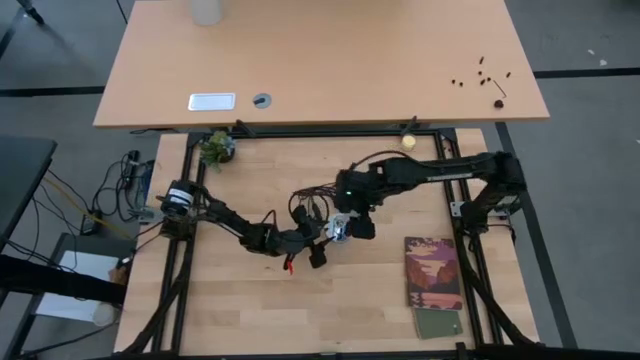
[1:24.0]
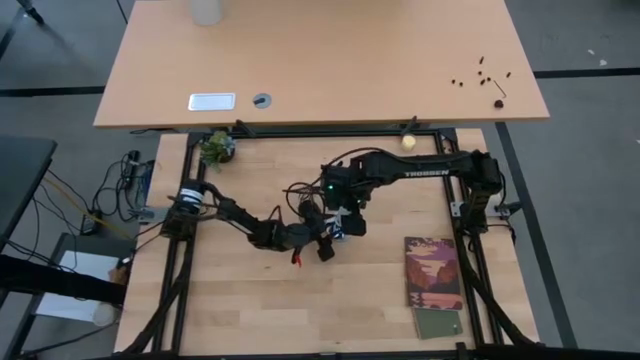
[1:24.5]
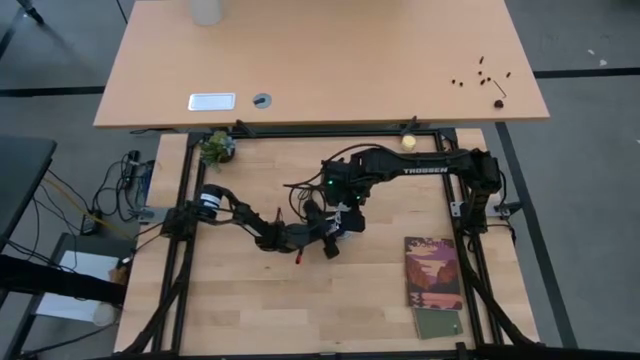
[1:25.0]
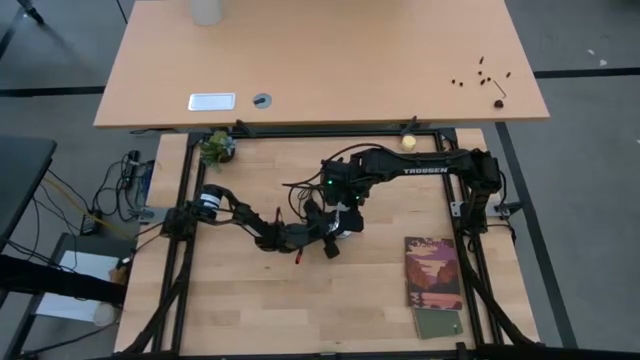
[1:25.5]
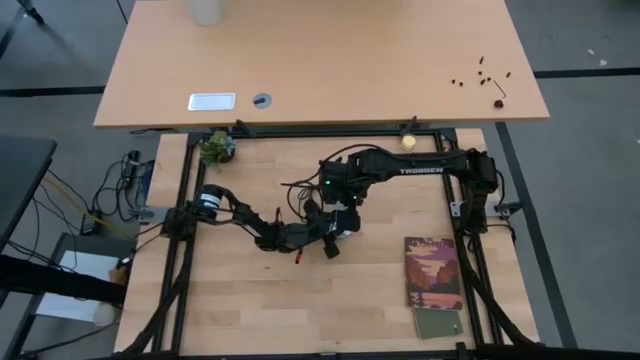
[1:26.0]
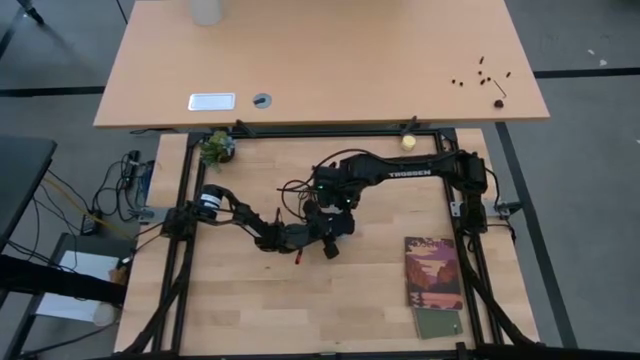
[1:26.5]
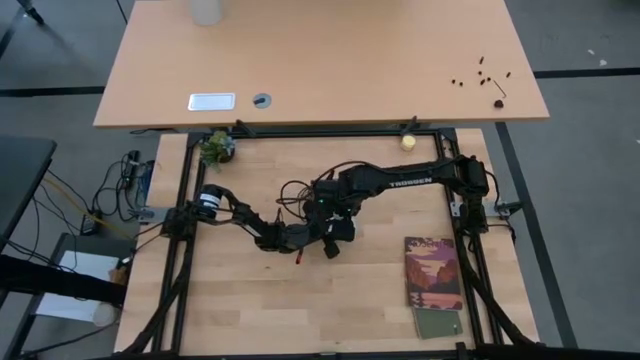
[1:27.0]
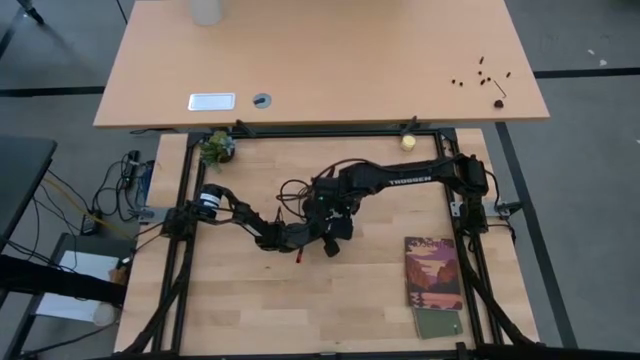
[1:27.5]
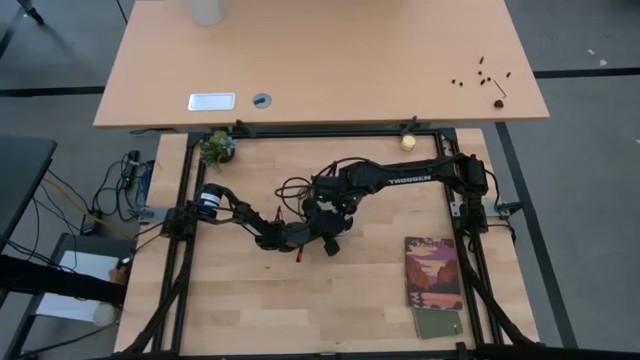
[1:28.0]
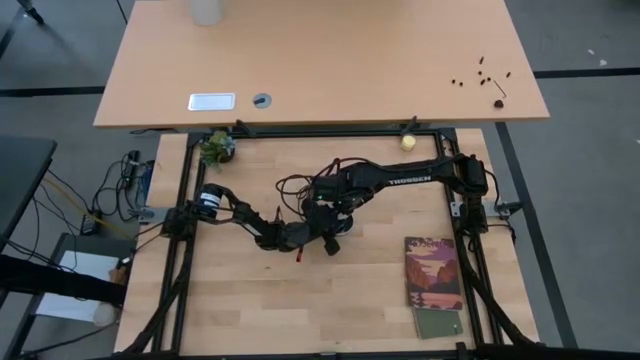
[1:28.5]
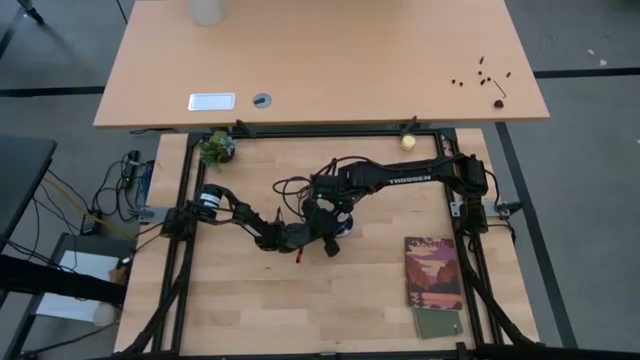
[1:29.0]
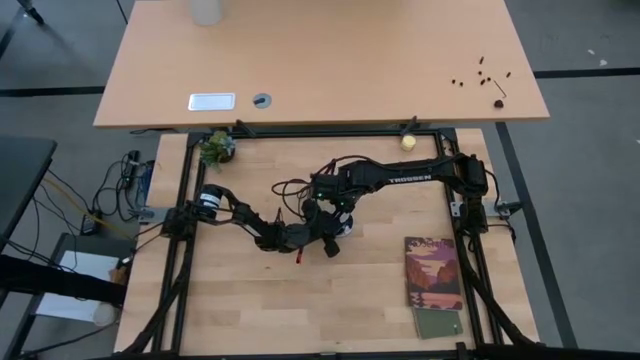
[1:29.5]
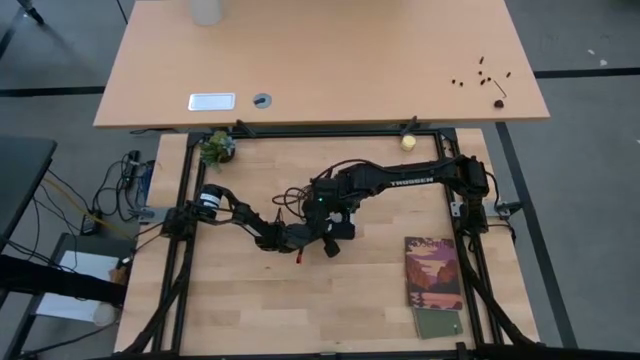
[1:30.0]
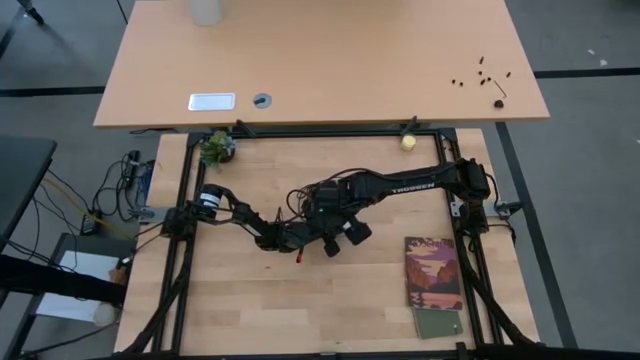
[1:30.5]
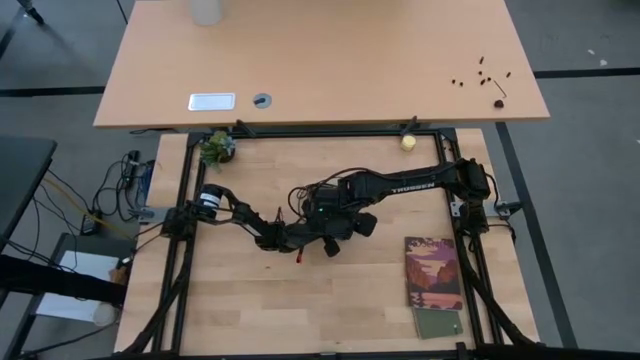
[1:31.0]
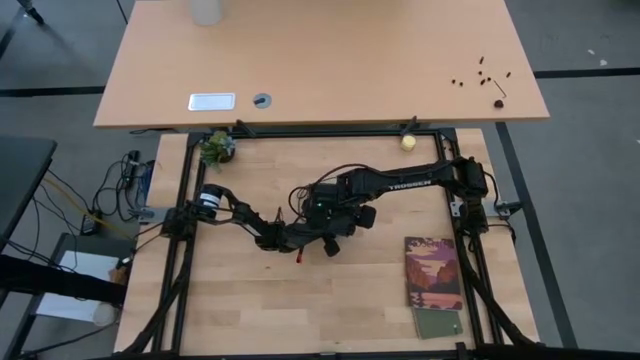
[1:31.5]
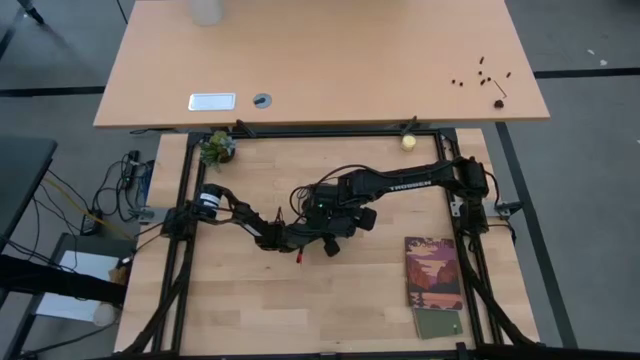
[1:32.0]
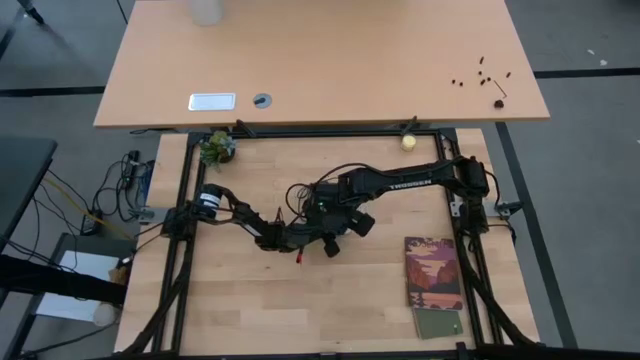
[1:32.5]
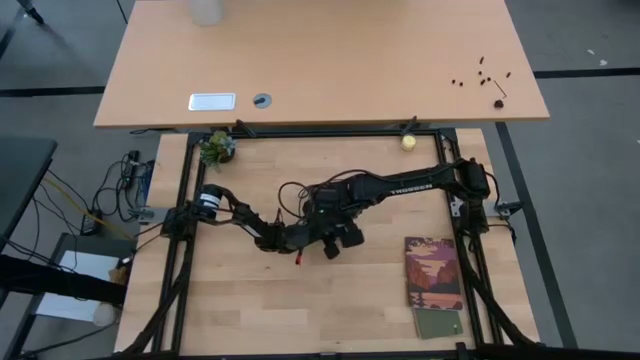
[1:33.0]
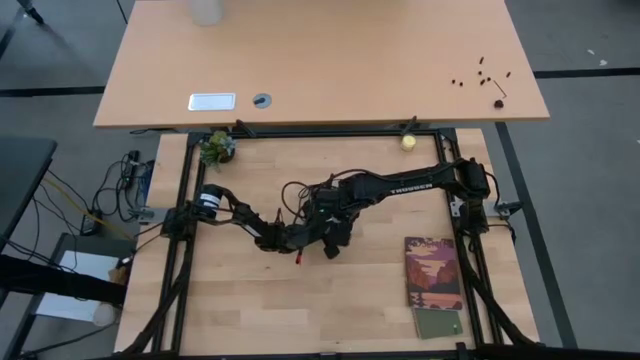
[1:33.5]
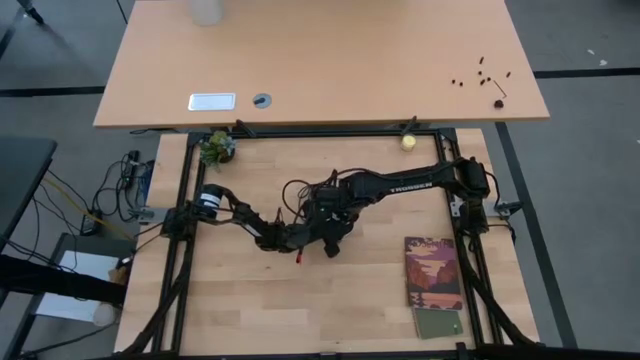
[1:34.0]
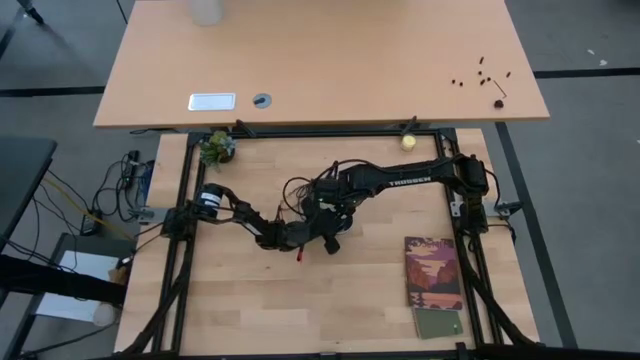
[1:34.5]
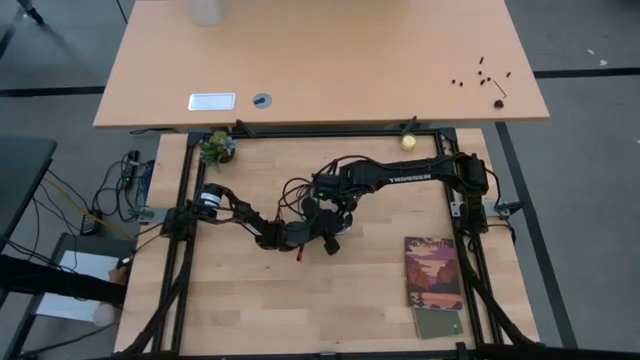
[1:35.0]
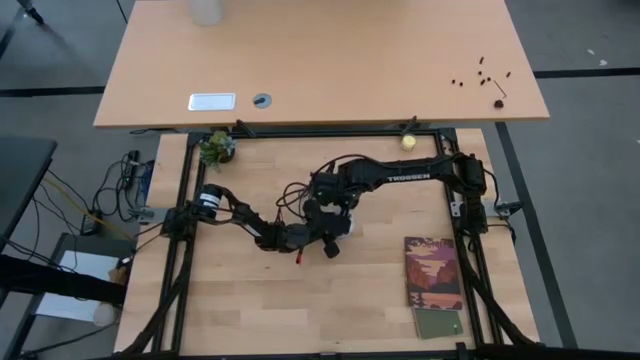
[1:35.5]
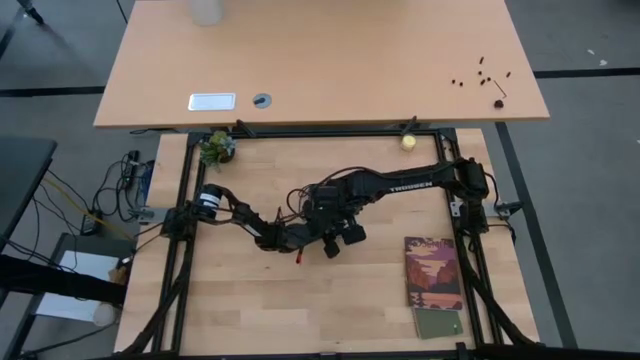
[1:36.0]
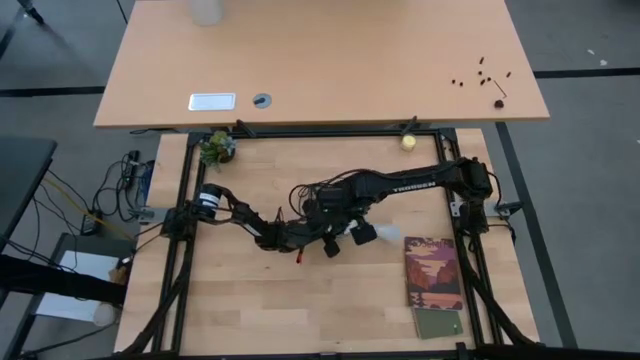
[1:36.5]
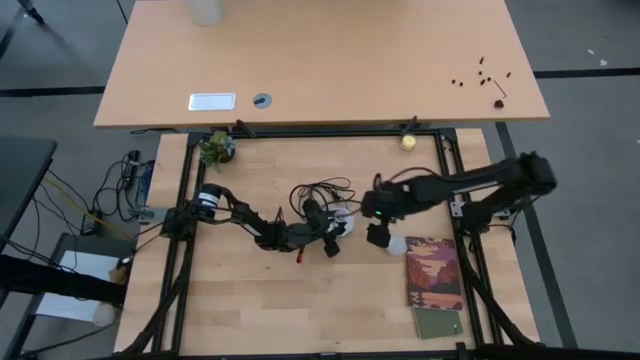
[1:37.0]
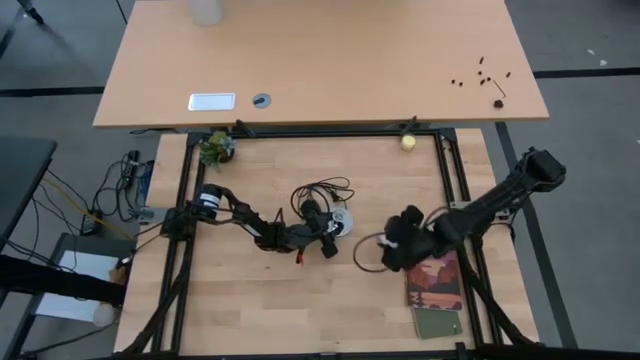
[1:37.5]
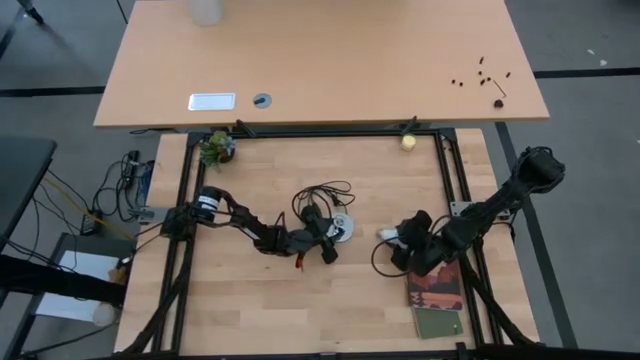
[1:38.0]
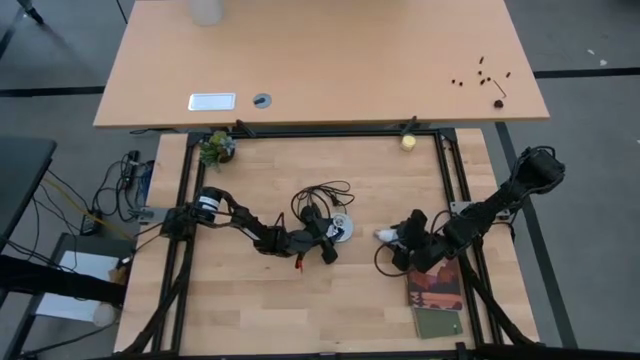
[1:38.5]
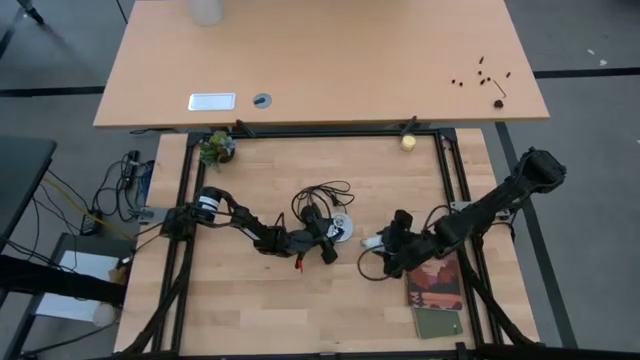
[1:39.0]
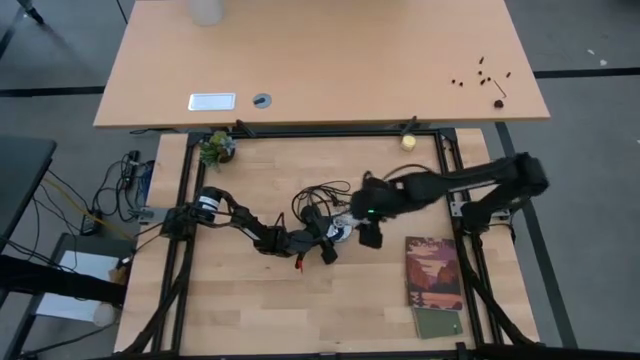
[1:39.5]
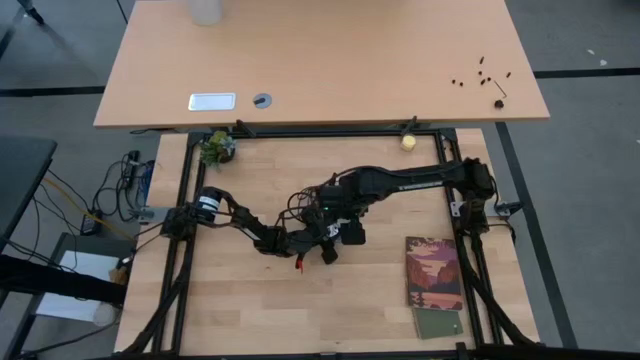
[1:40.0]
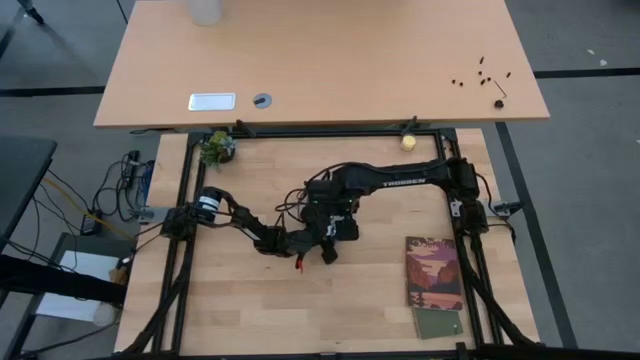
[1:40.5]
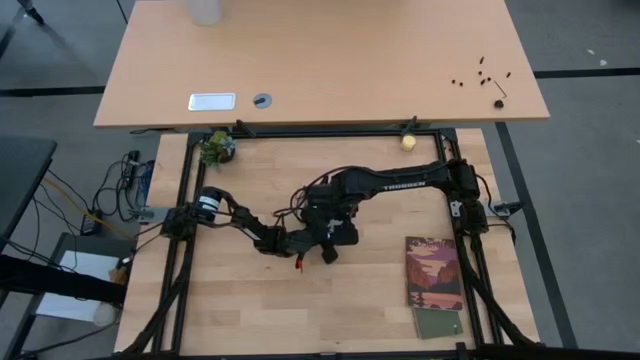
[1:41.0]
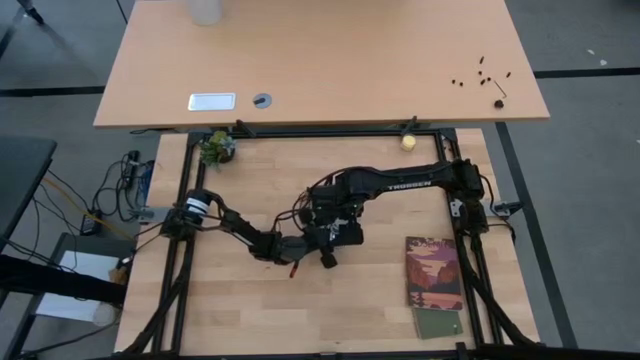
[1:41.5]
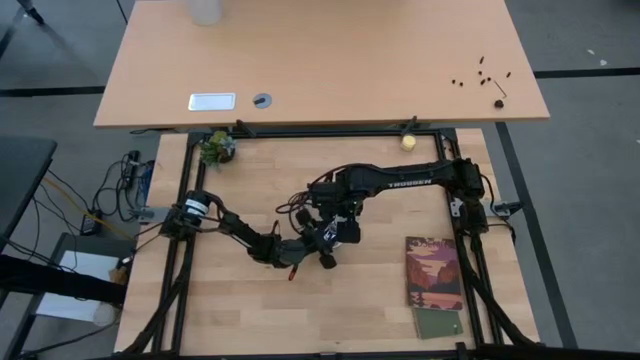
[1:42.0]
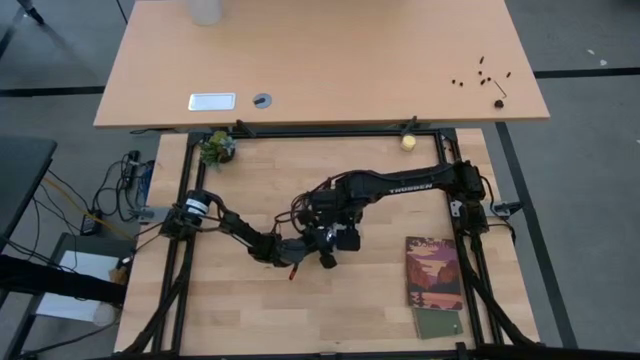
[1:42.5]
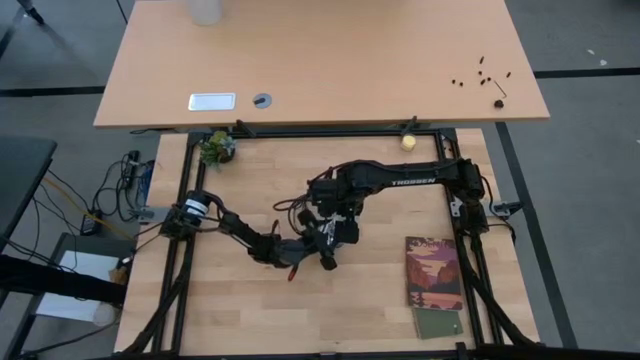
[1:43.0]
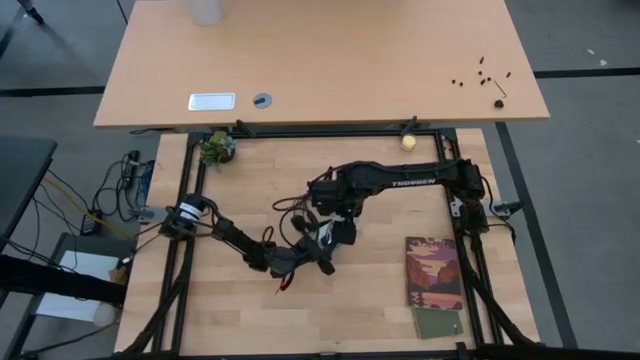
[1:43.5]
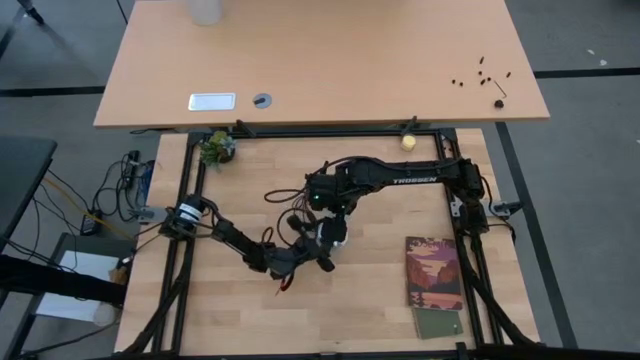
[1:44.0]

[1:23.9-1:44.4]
Task: Screw lightbulb
Insert the white lightbulb into the silver lamp
